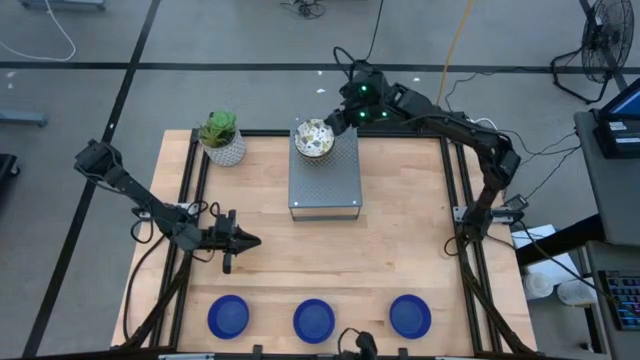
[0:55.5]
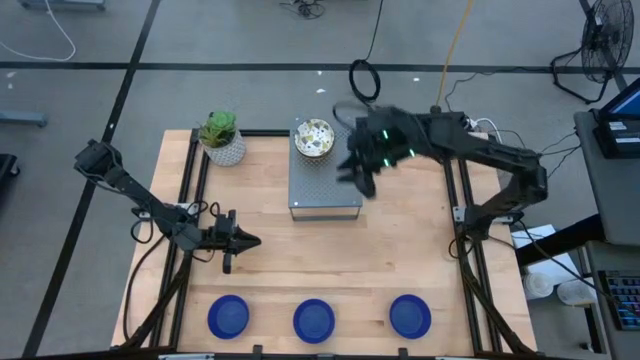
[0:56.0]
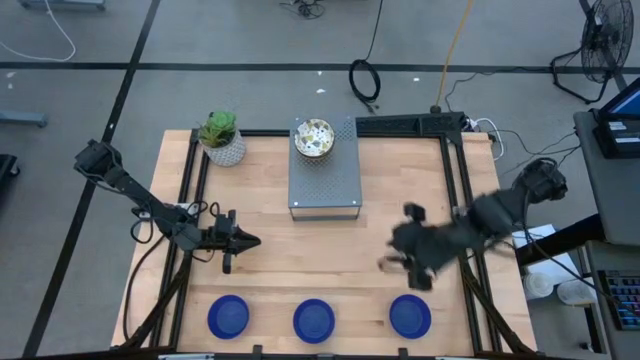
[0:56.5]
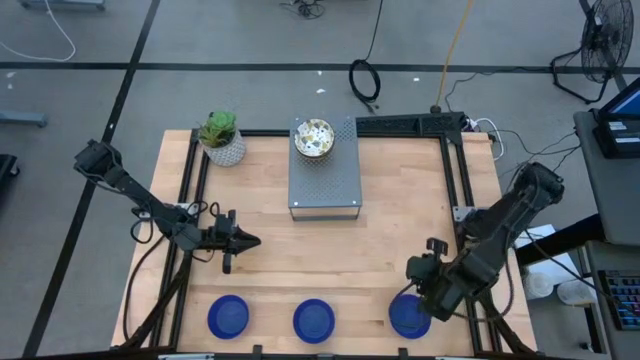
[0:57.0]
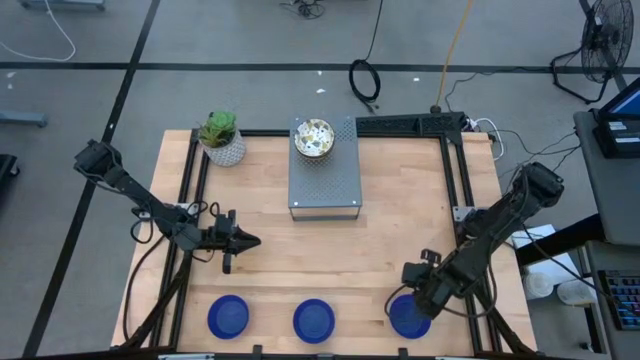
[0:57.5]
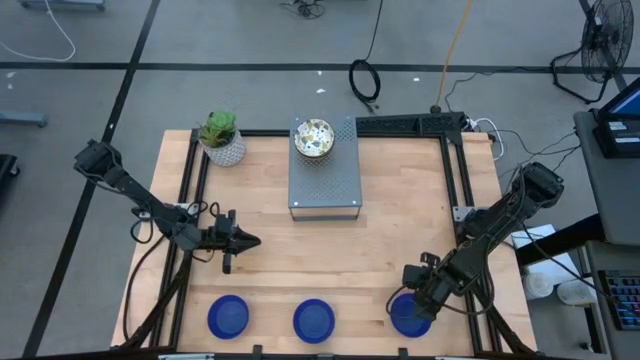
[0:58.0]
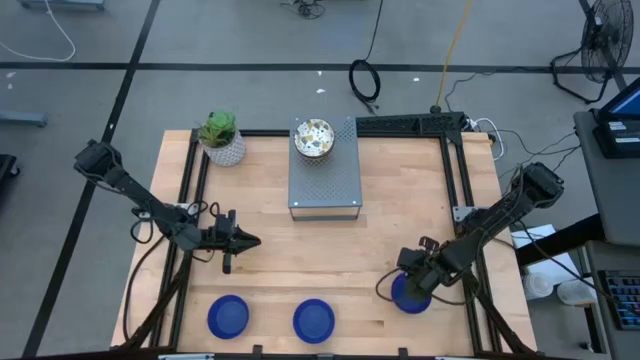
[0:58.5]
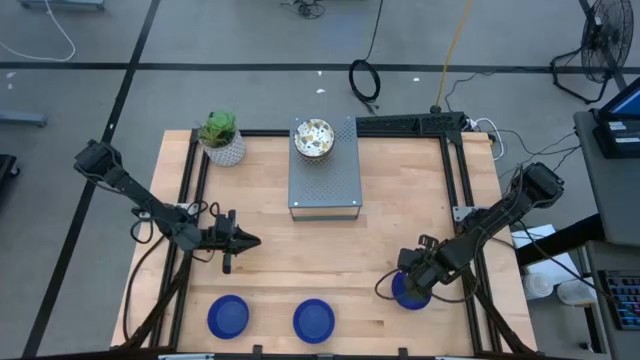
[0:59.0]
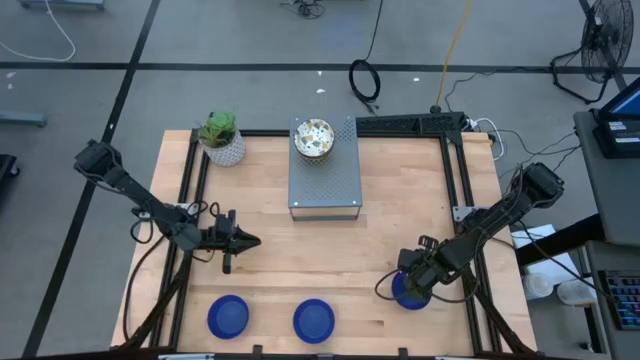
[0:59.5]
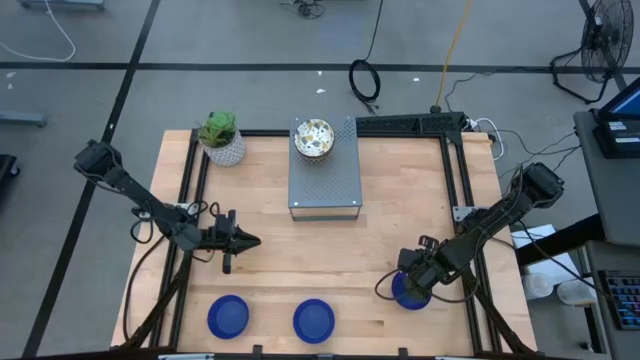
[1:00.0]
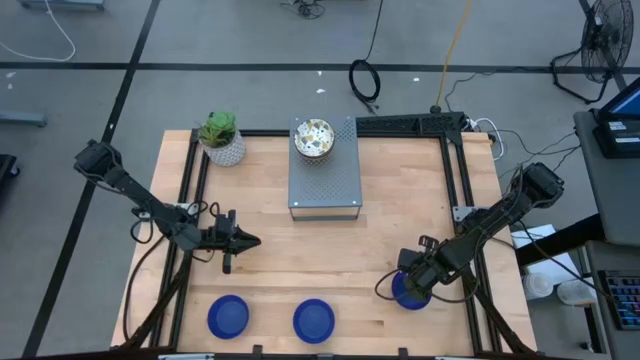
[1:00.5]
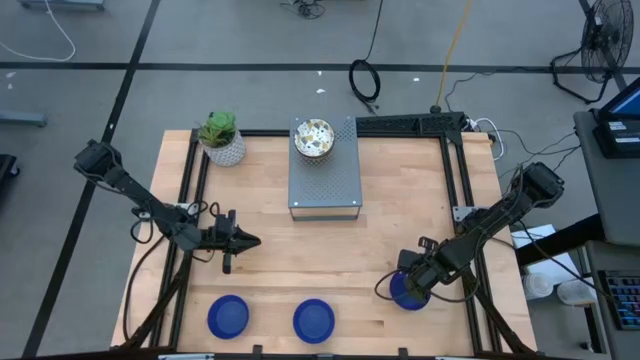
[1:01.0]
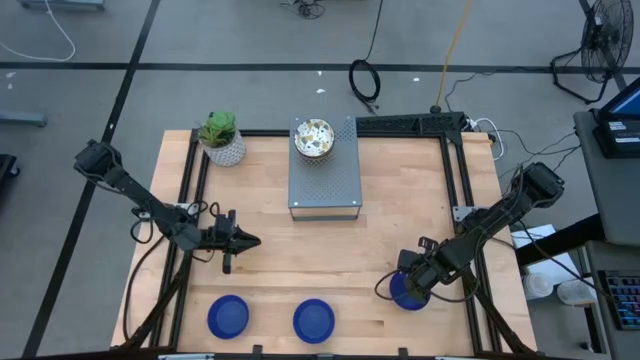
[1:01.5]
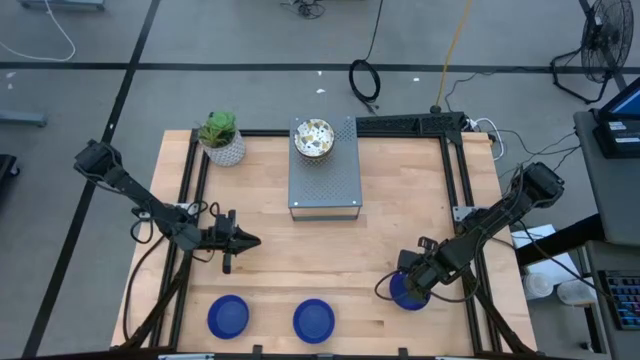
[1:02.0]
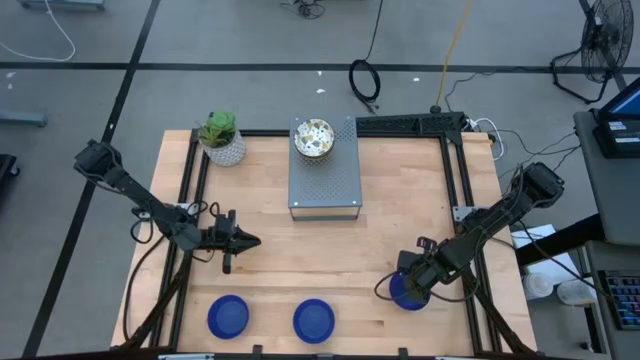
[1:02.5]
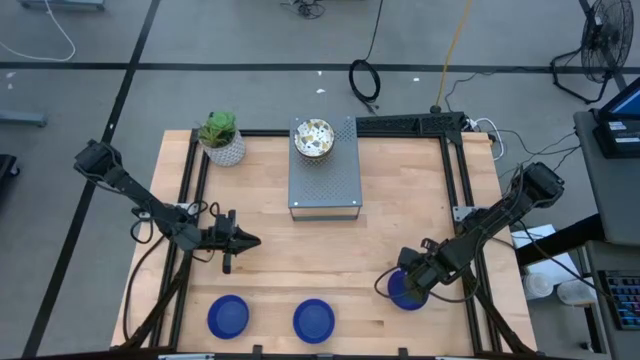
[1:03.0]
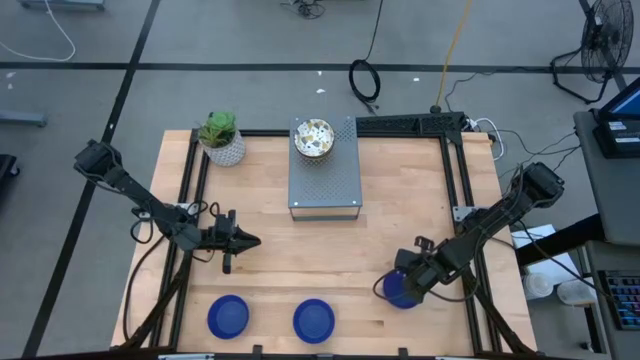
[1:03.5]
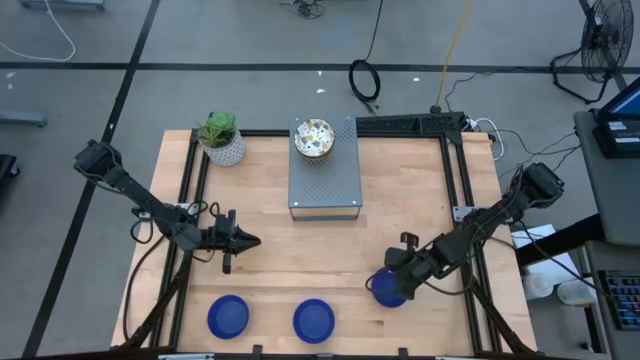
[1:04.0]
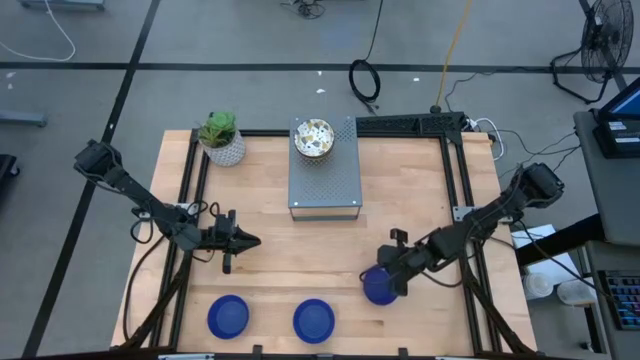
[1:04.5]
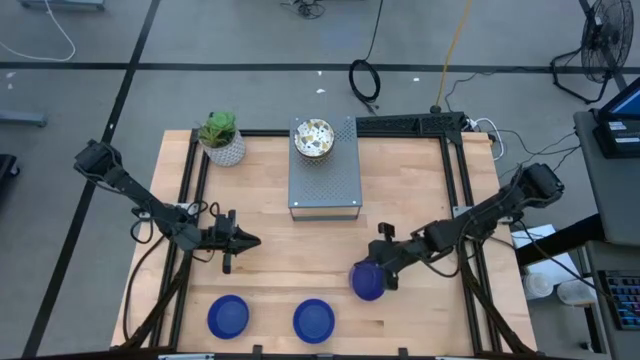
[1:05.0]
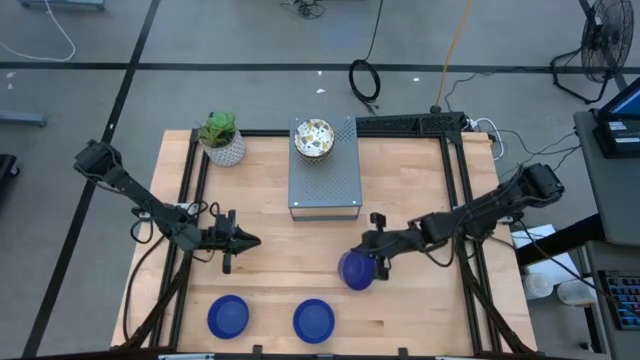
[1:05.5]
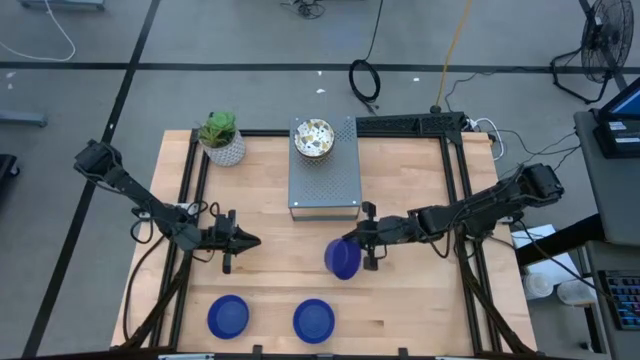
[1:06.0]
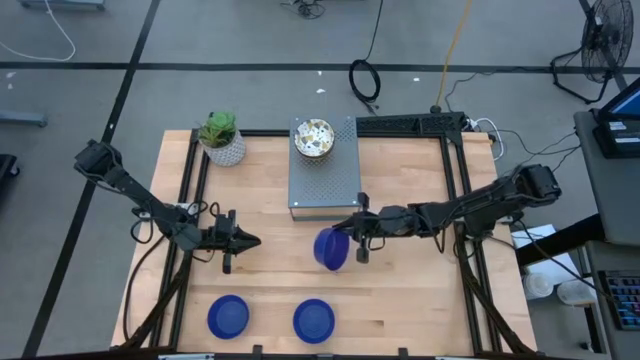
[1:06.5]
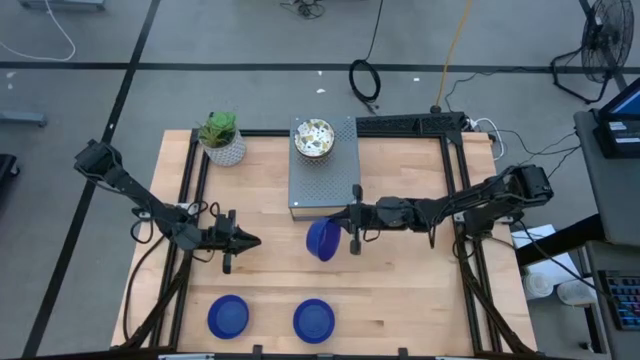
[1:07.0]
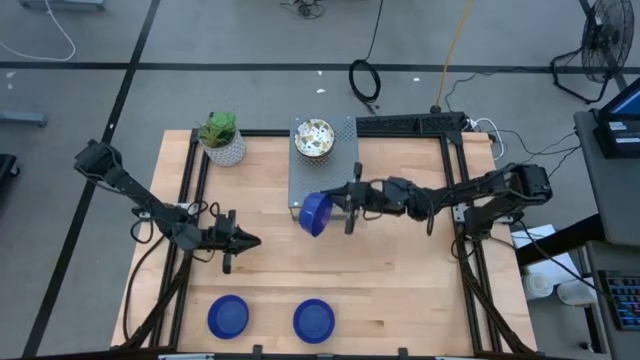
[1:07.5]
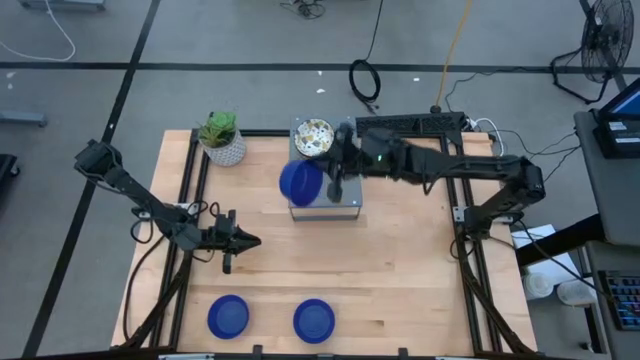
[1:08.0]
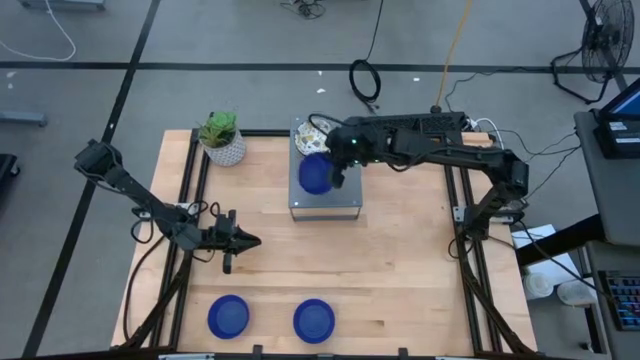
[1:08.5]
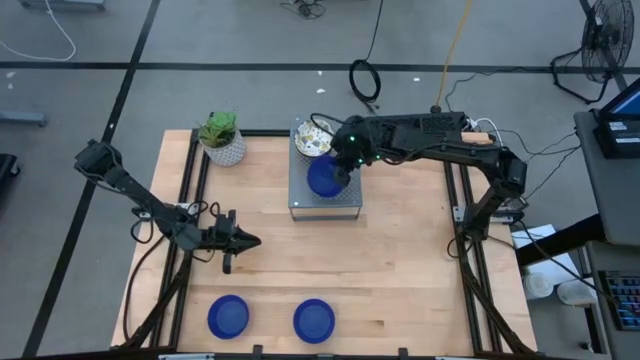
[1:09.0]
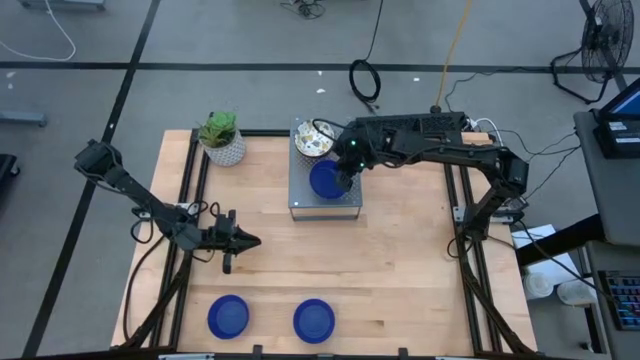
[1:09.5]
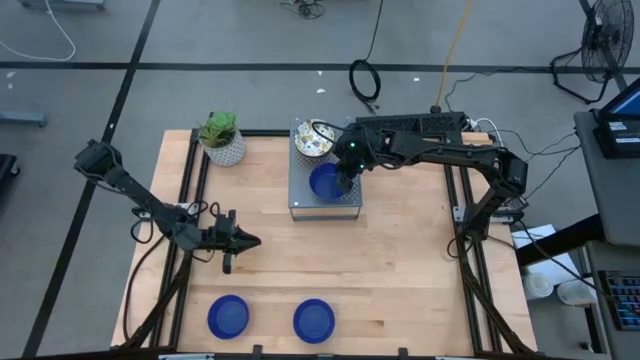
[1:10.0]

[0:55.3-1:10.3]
Task: Pick & Place Mini bowls
Put the right blue bowl on the shelf

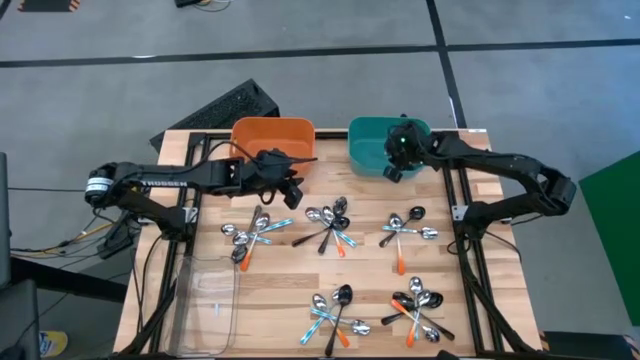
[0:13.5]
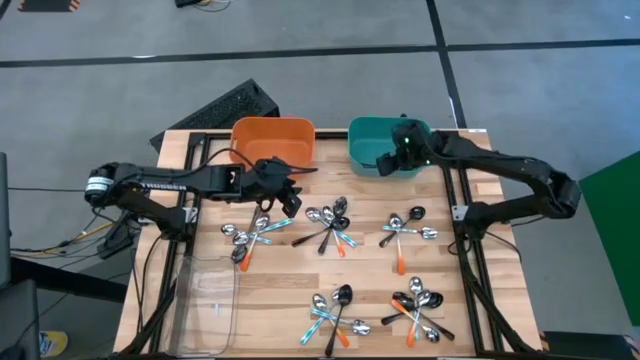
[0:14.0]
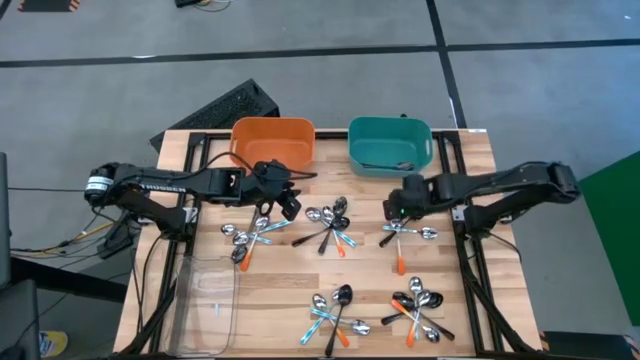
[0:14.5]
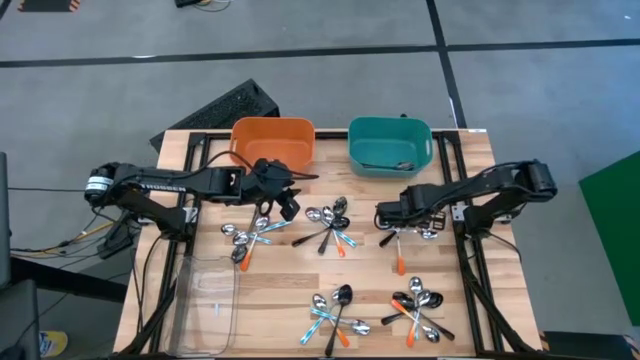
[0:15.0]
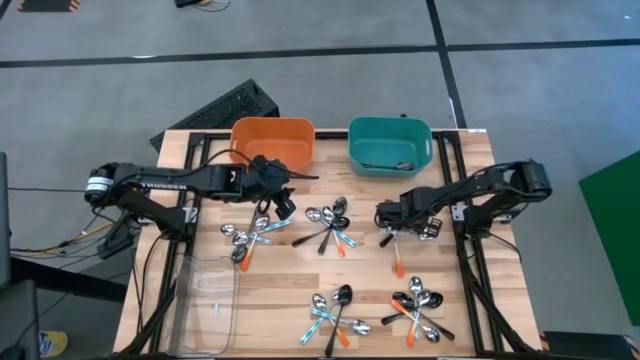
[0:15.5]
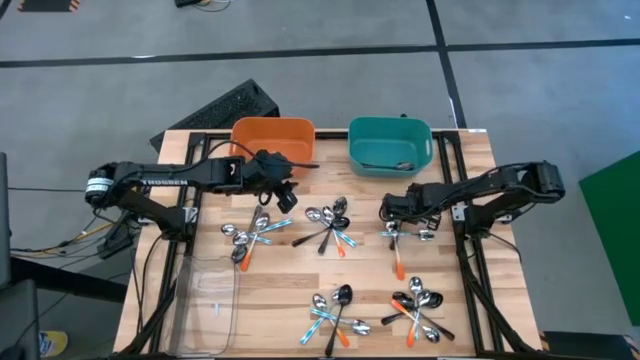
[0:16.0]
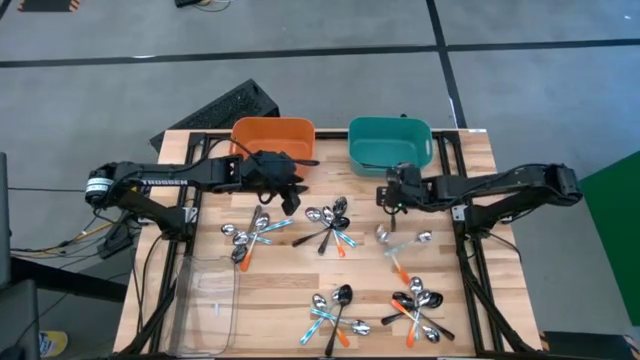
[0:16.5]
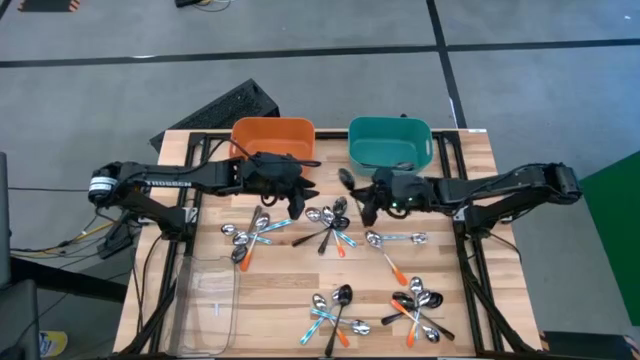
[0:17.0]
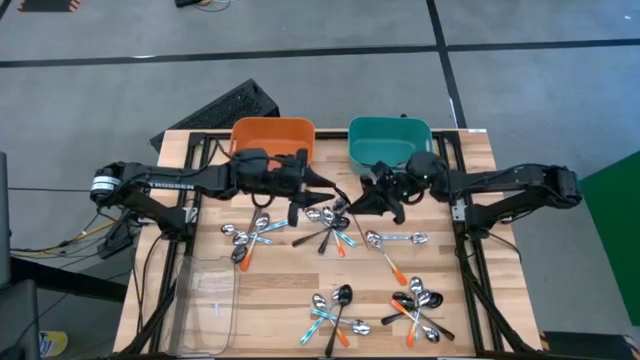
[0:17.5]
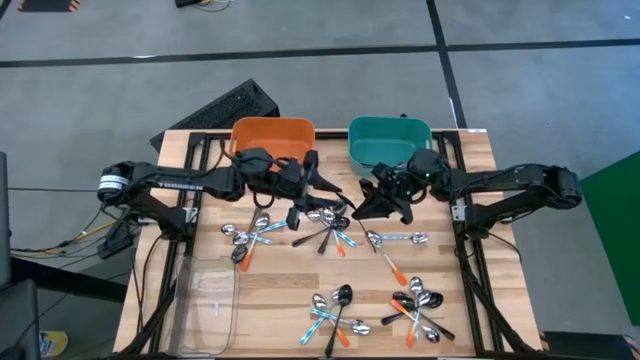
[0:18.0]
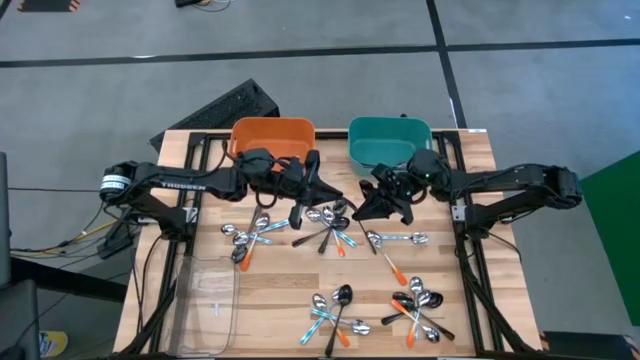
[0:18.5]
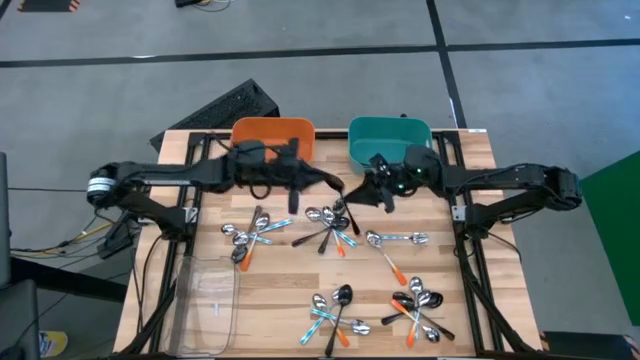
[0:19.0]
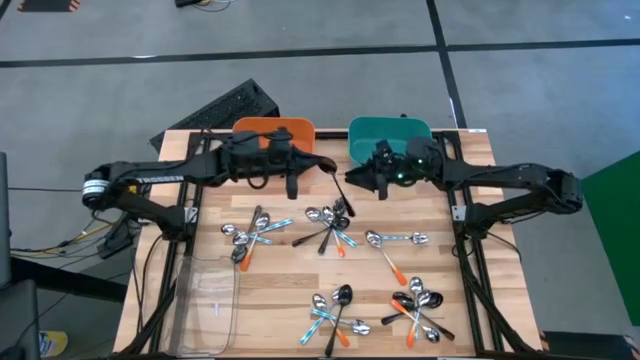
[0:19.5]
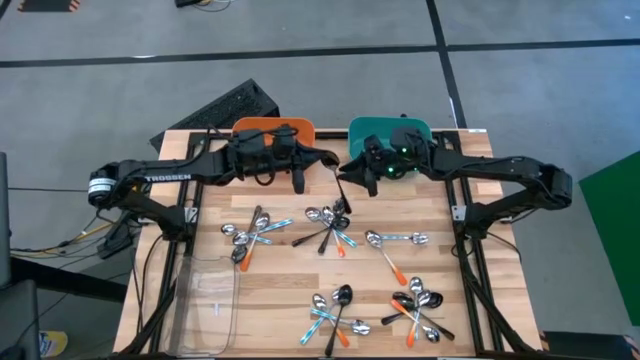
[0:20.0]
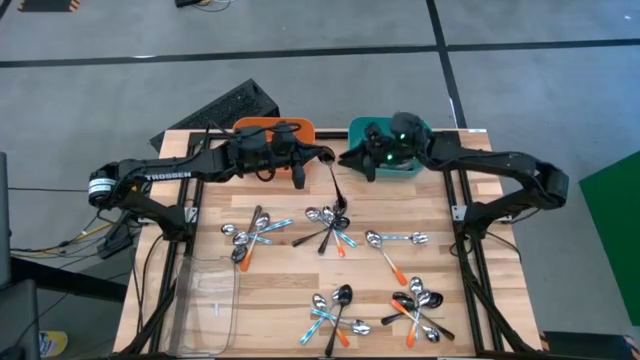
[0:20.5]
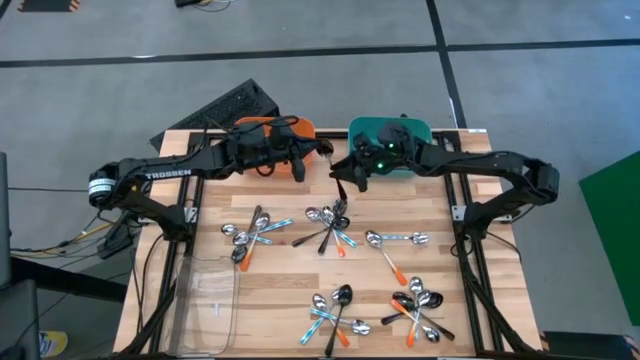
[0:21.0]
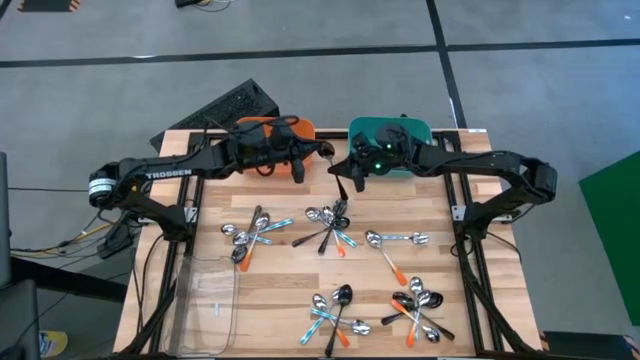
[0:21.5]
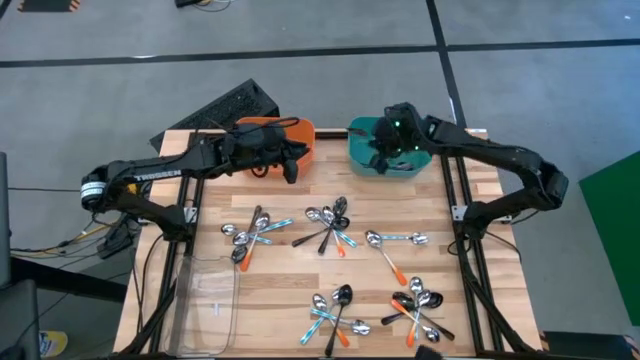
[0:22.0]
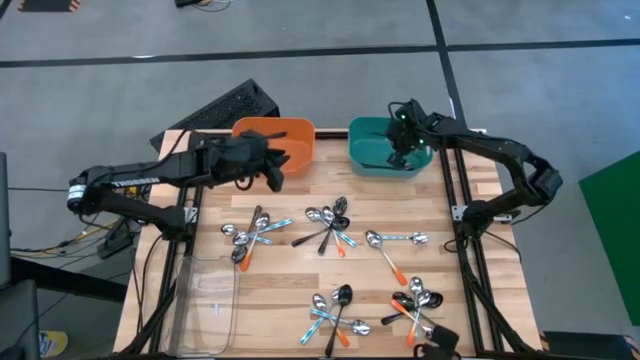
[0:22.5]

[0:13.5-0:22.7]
Task: Sort silverware by color (type)
Put the black spoon into the blue bin
